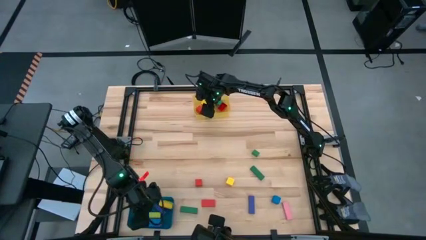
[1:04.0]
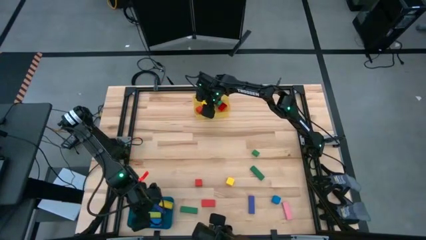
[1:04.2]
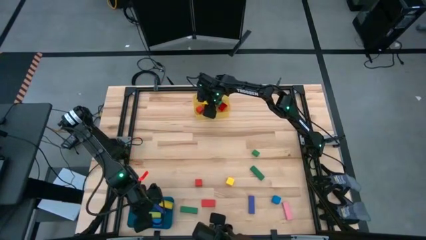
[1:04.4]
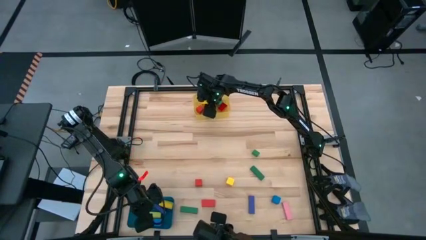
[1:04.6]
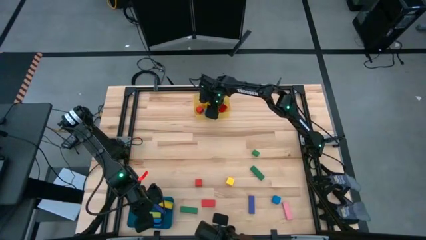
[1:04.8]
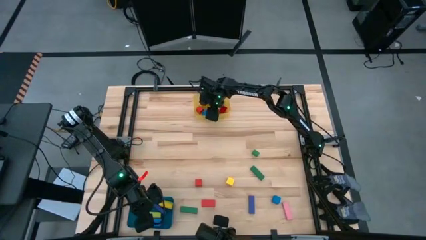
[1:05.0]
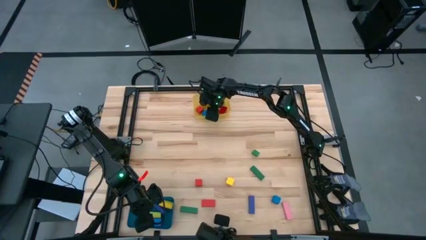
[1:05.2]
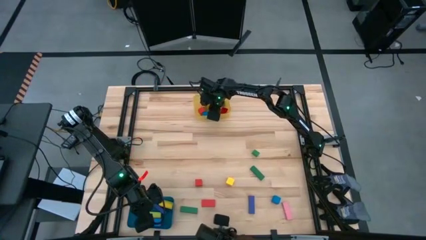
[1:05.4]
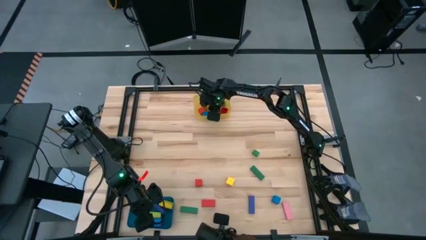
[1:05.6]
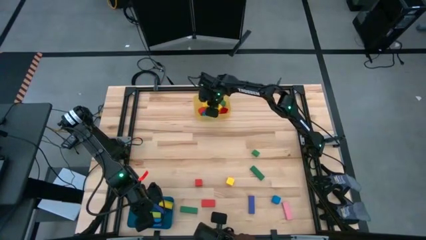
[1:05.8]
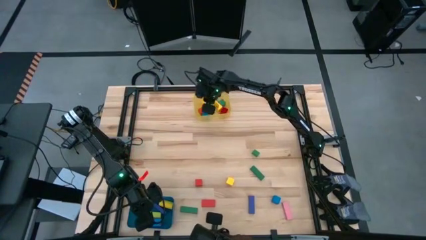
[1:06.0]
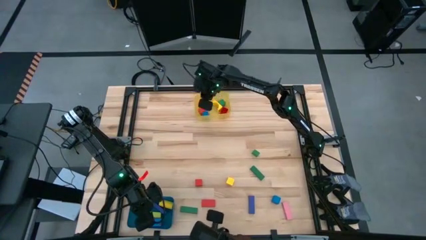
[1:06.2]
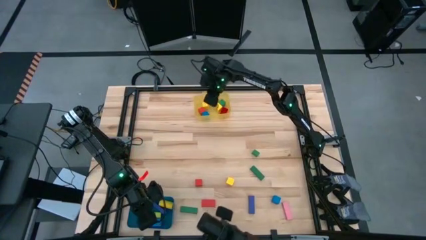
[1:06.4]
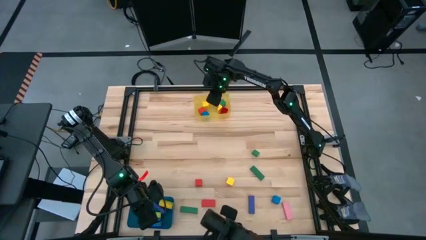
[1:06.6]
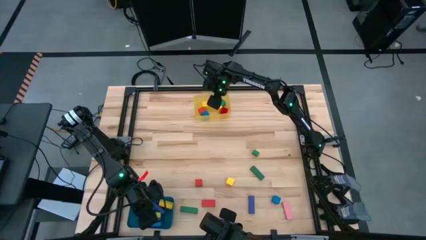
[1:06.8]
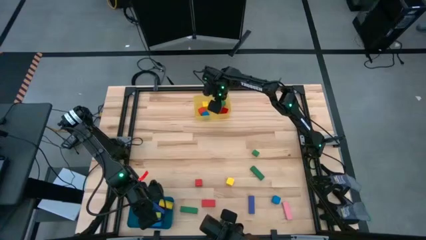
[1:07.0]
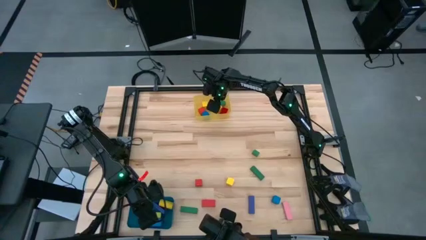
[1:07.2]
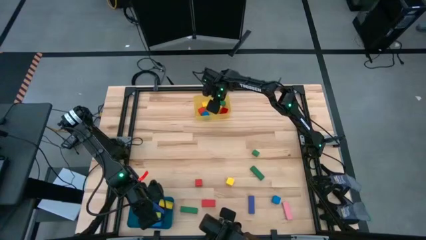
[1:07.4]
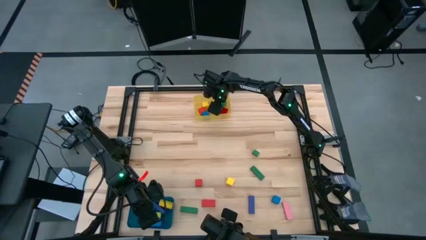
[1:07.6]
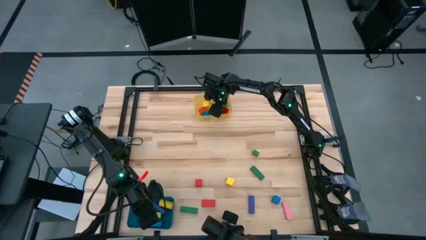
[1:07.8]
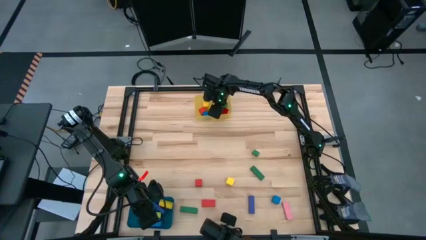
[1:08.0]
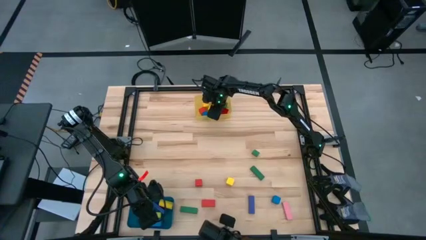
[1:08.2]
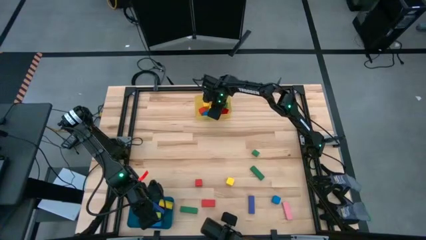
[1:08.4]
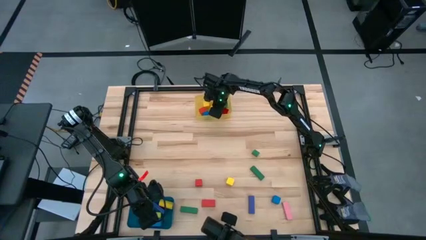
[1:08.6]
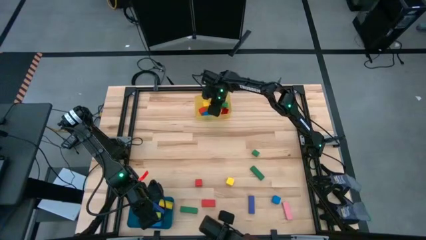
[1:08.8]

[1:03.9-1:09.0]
Task: Sort blocks by size
Put the yellow arch into the blue bin

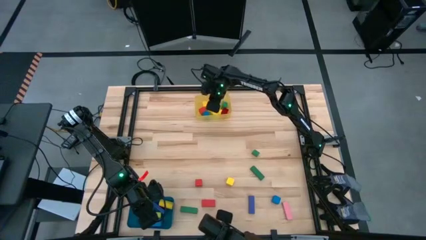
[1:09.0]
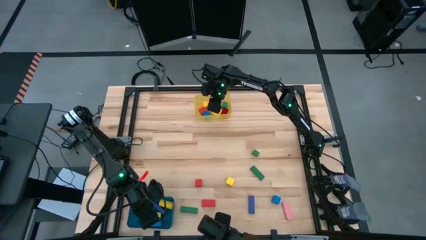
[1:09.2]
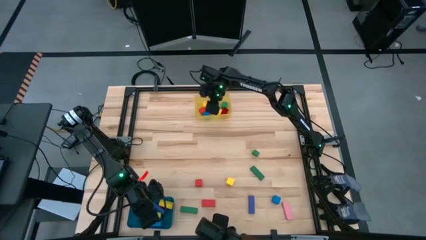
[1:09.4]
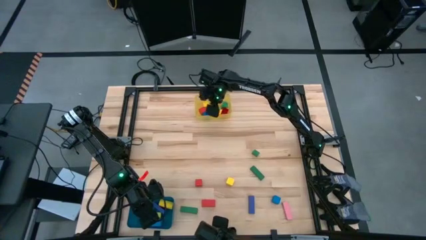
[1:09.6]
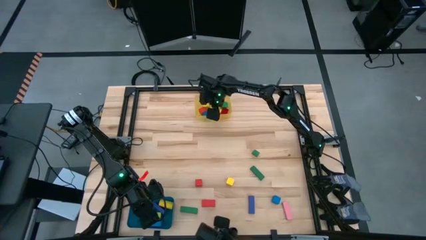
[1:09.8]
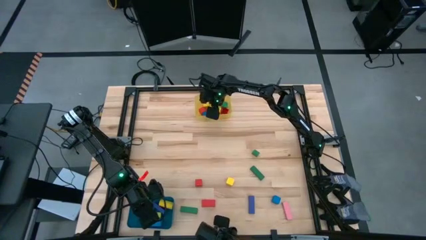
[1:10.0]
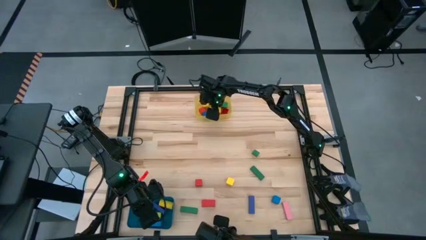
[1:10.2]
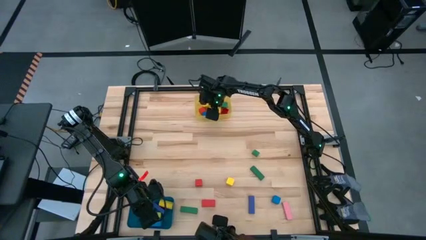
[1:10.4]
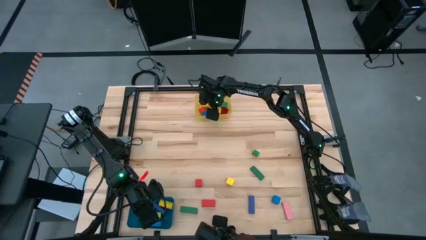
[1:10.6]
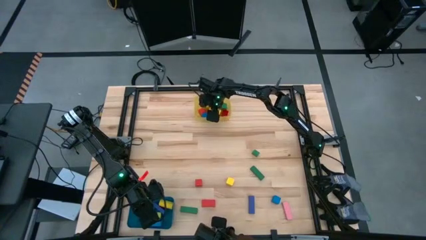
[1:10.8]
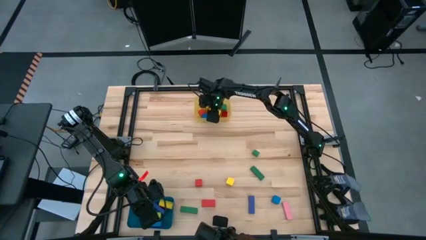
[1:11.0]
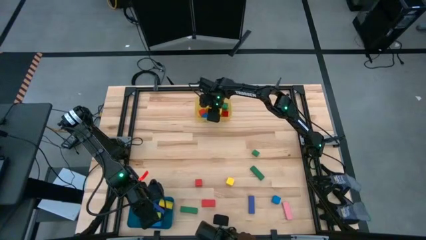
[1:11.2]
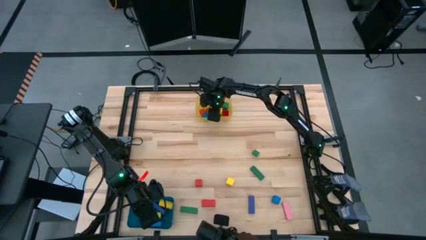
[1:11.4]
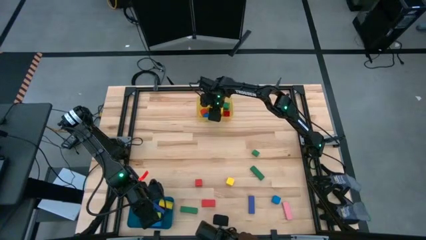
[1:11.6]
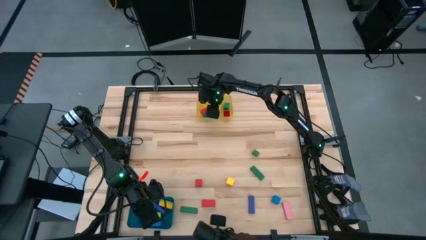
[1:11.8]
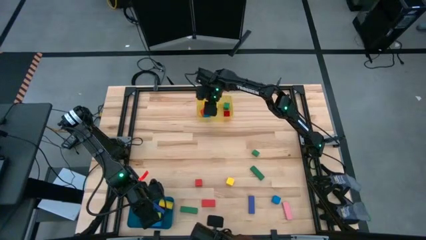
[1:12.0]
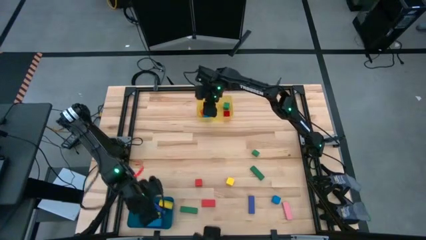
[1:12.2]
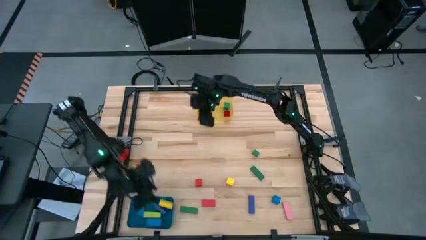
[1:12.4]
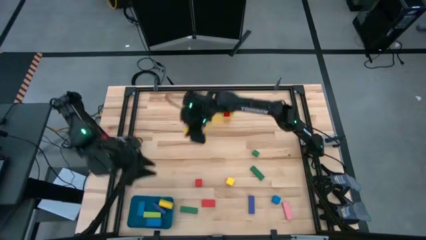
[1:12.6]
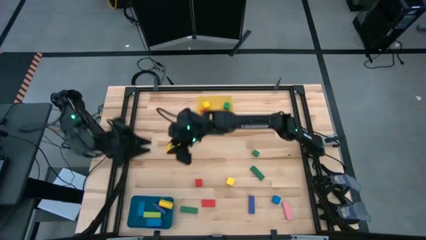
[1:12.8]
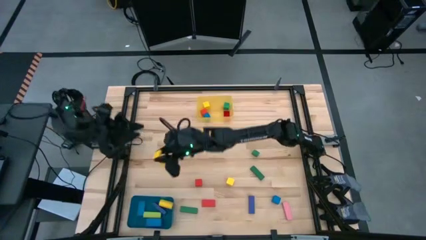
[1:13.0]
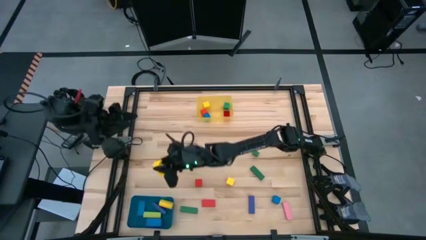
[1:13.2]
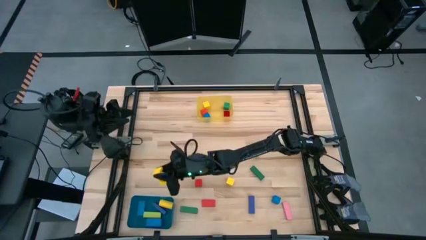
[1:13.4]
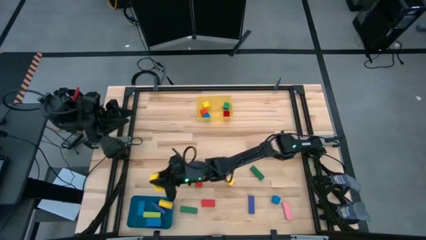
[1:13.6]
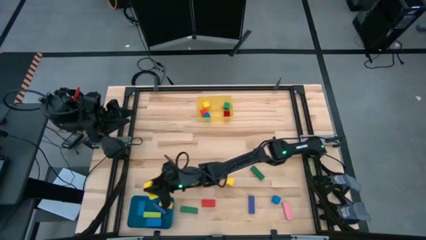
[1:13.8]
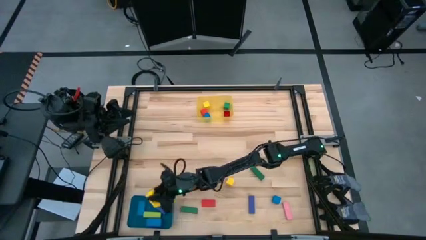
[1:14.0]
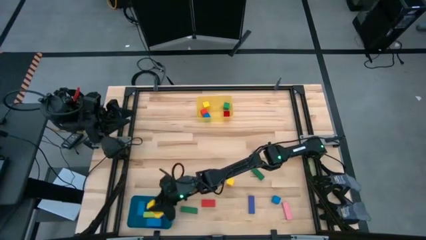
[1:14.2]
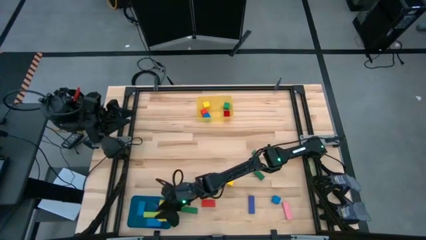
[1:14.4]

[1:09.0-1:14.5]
Put the yellow arch into the blue bin

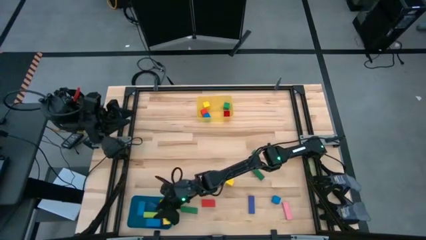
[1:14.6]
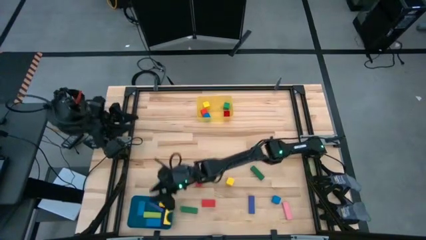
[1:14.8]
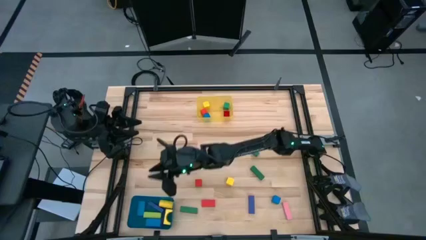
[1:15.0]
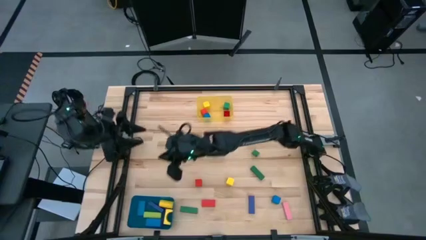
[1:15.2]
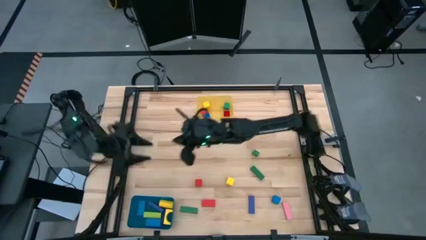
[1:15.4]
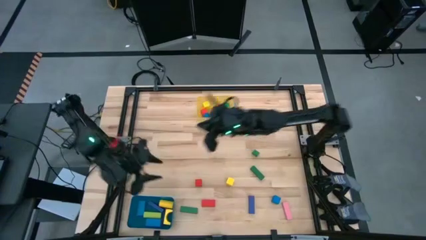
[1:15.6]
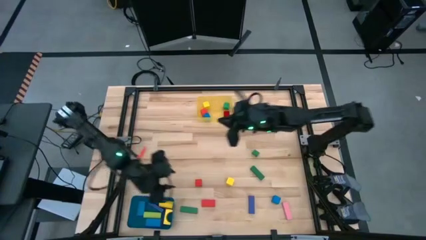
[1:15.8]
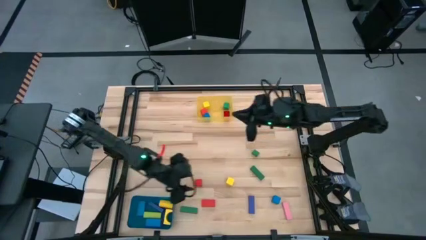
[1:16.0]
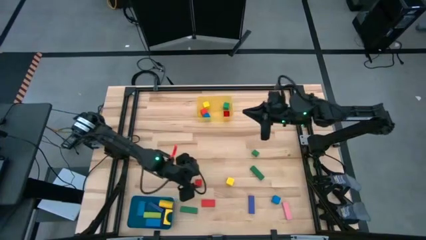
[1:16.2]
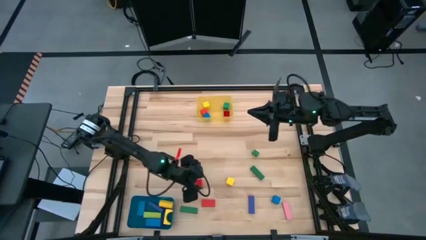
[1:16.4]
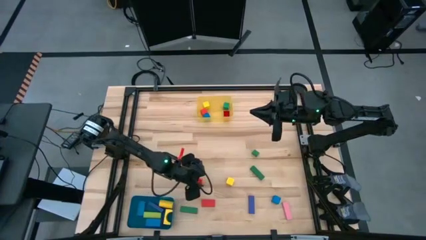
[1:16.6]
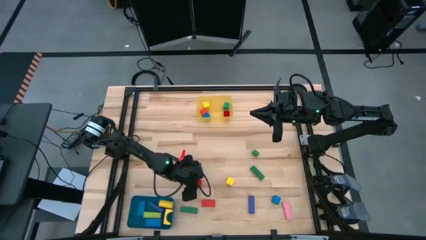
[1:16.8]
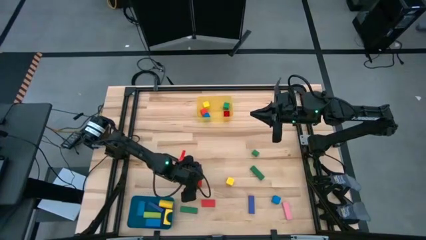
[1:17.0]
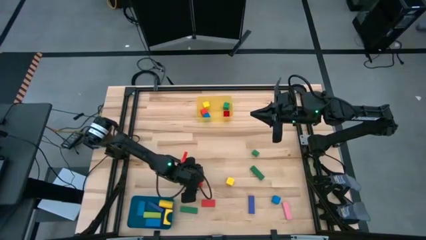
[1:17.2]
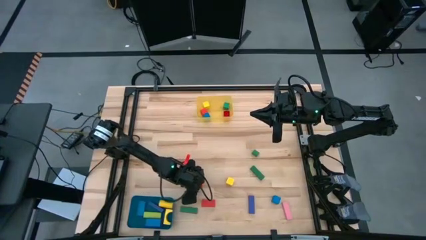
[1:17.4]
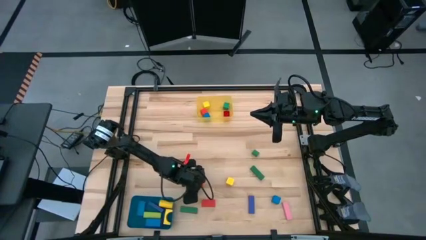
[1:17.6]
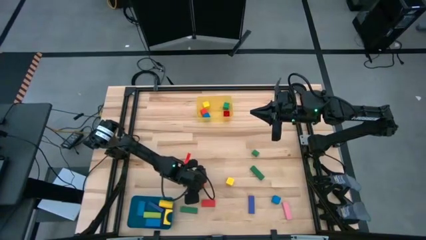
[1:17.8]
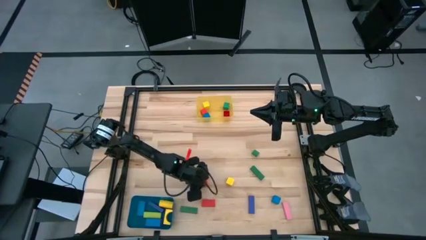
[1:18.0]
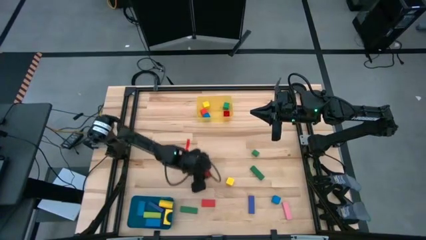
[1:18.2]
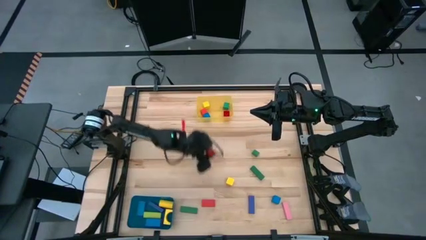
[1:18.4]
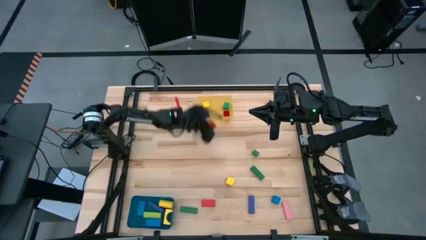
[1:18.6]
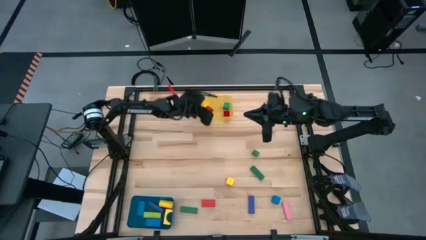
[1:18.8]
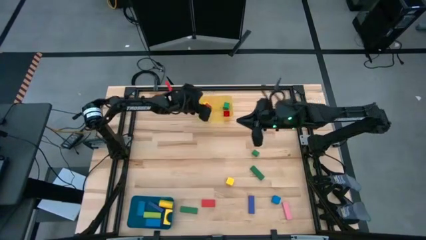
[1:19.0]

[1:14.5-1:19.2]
Put the red square block into the yellow bin
